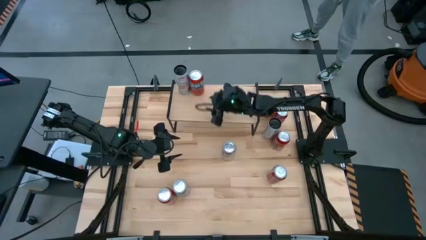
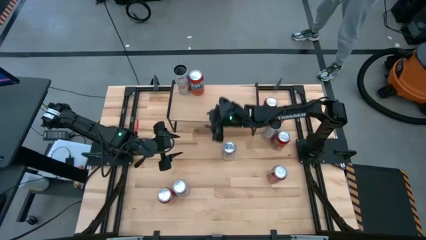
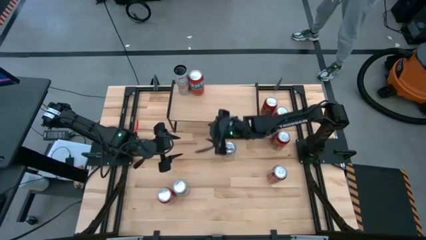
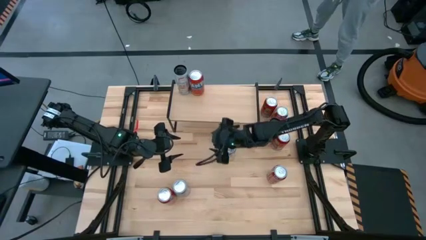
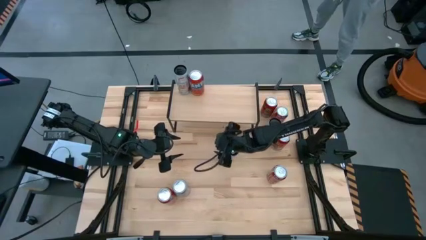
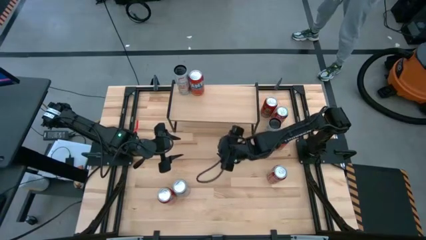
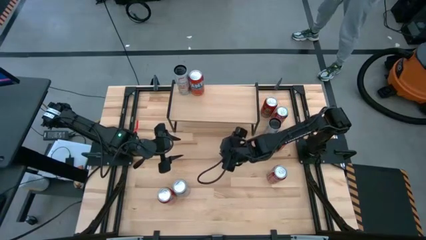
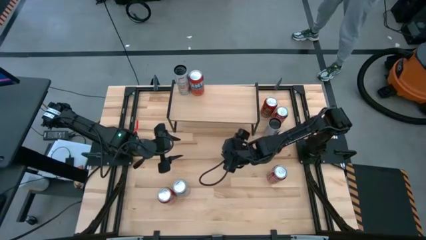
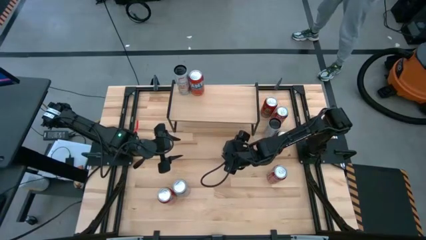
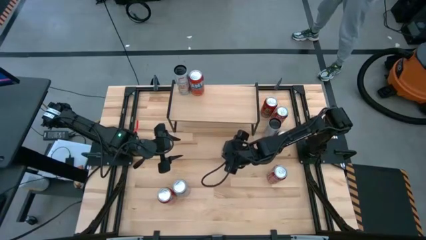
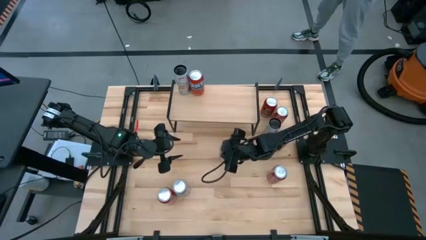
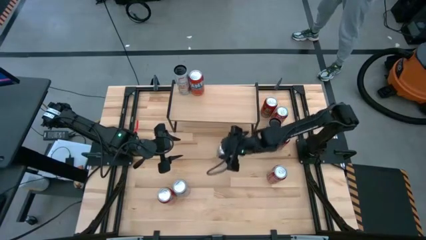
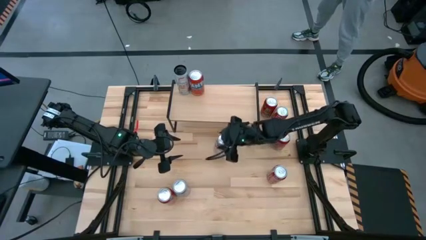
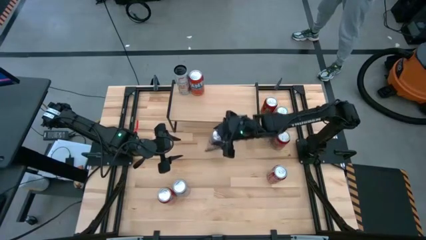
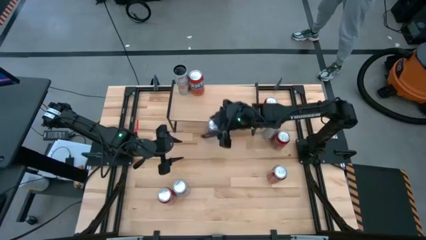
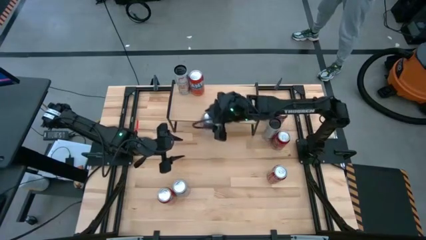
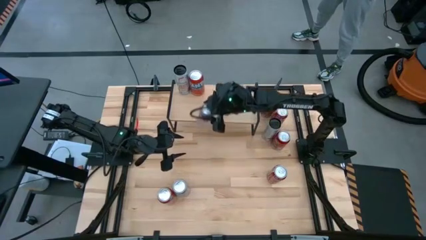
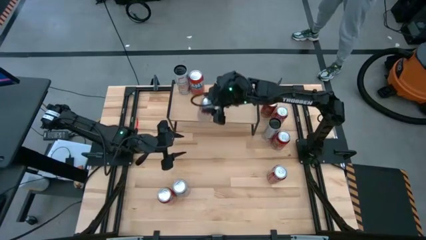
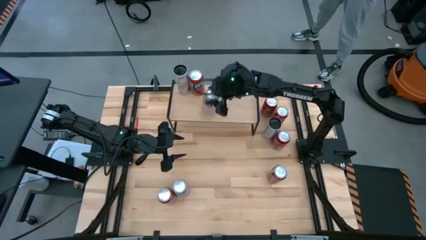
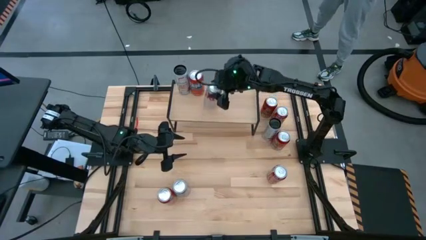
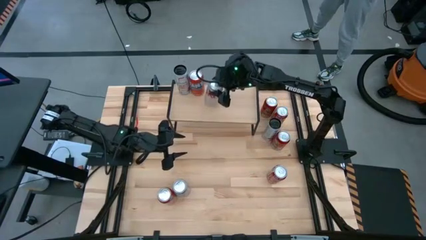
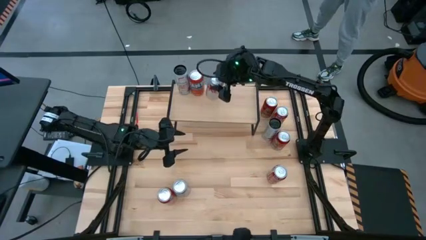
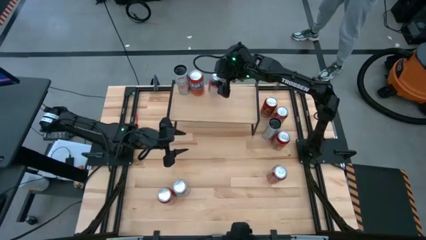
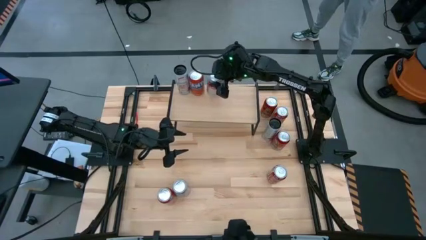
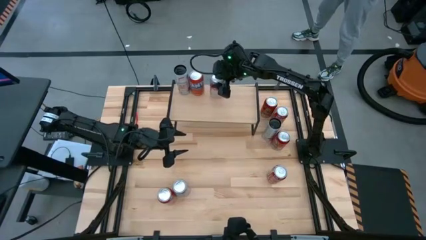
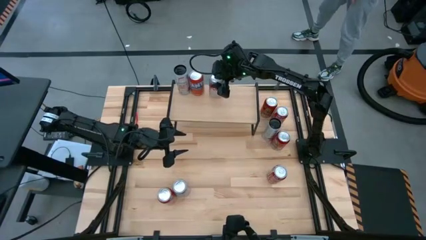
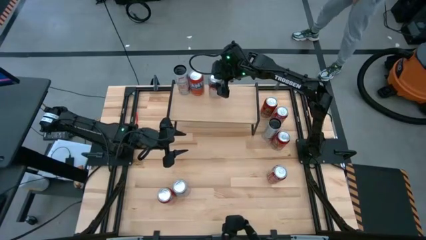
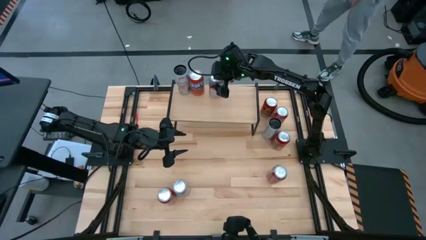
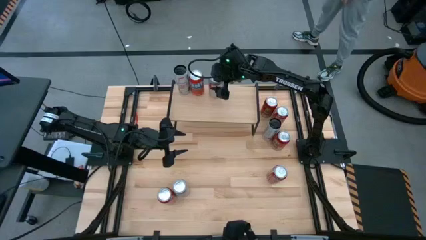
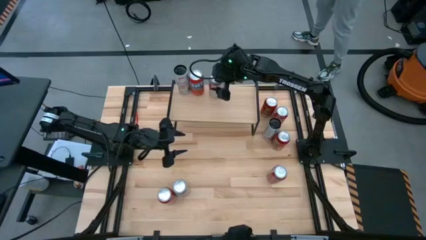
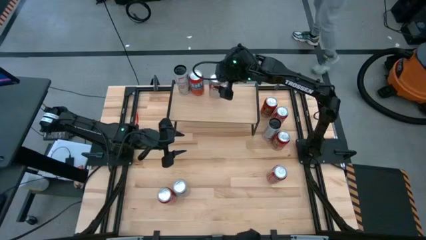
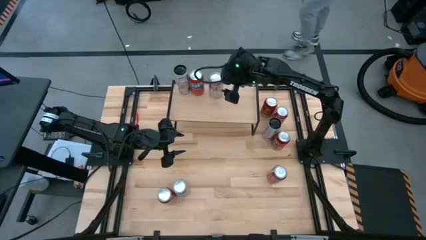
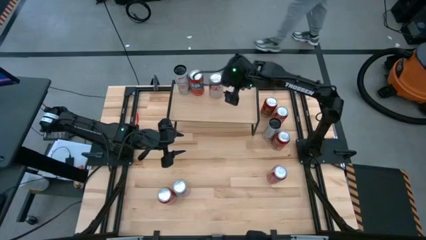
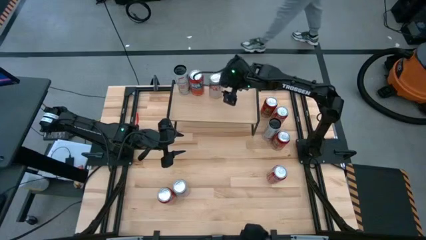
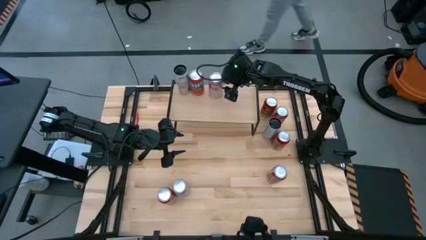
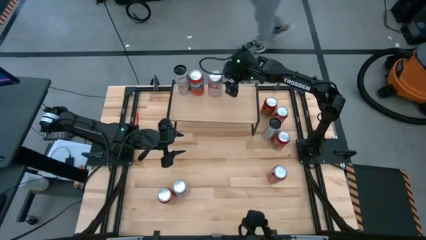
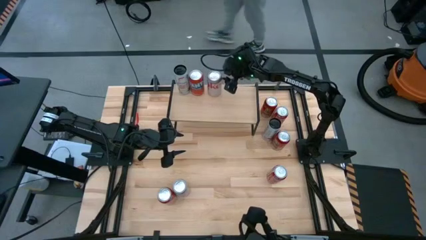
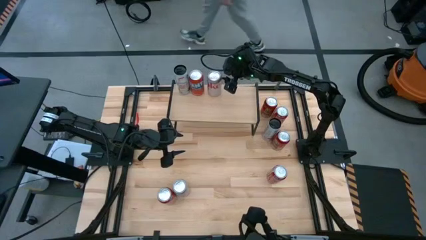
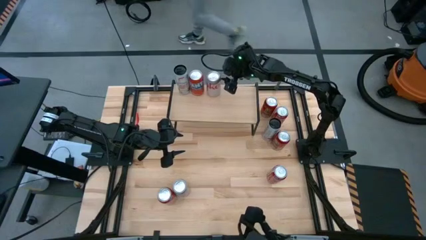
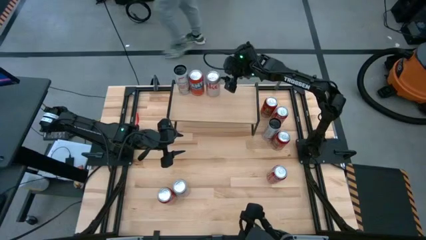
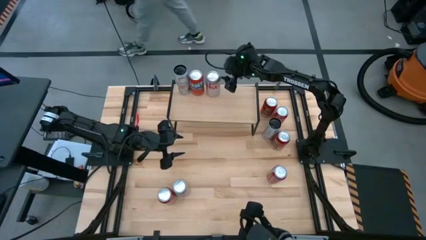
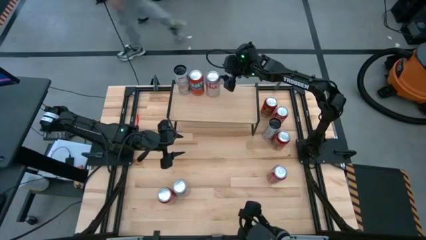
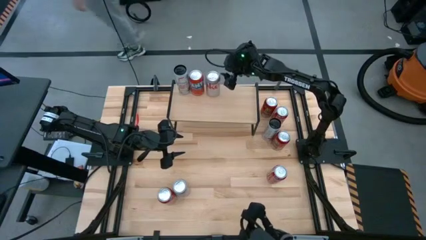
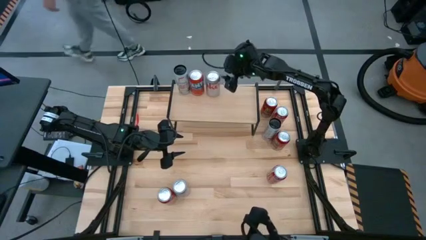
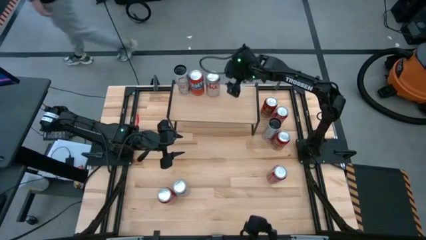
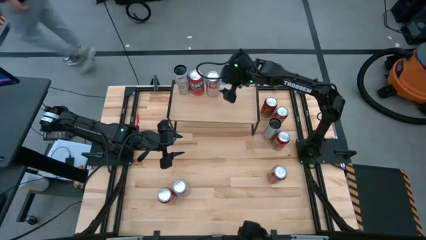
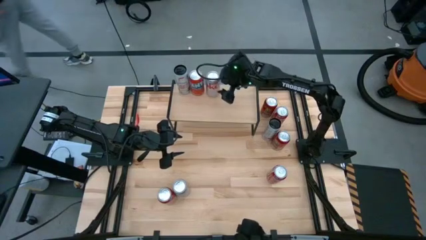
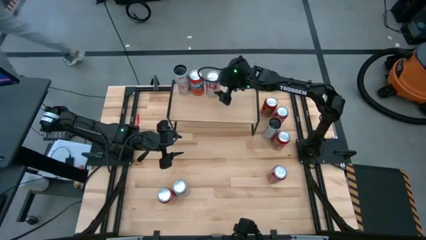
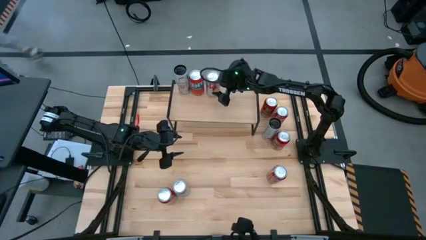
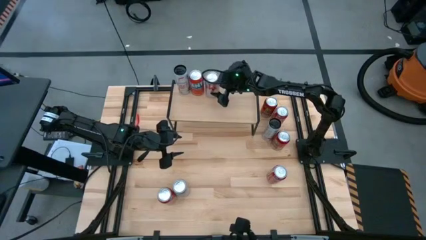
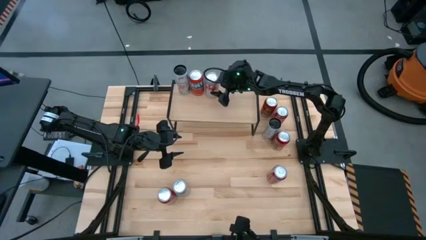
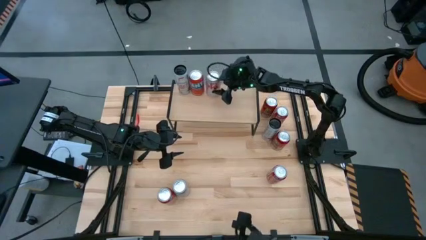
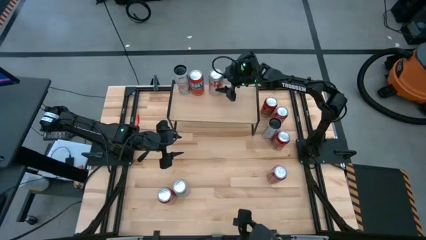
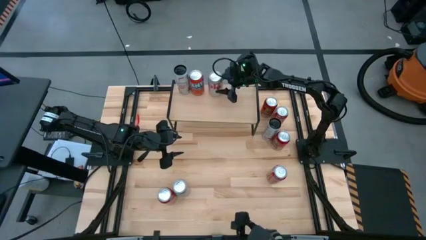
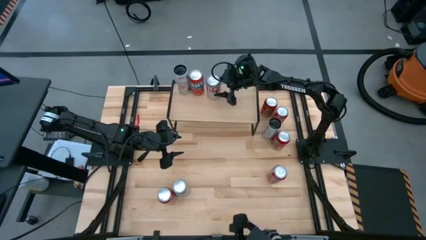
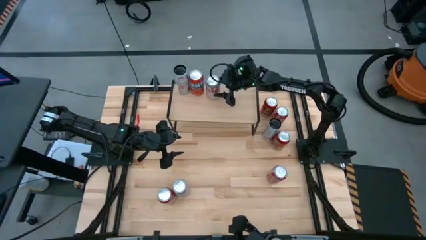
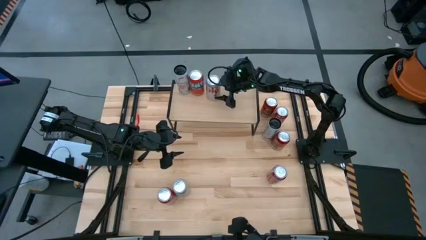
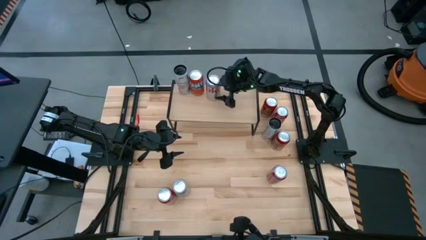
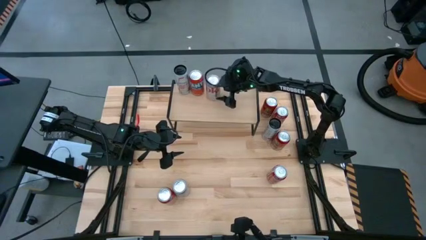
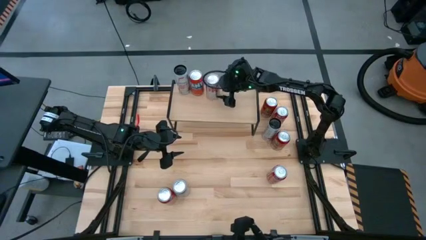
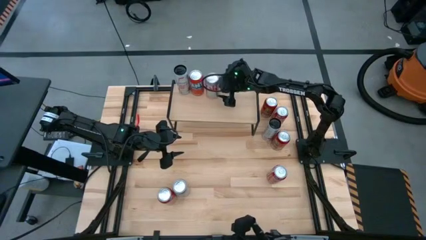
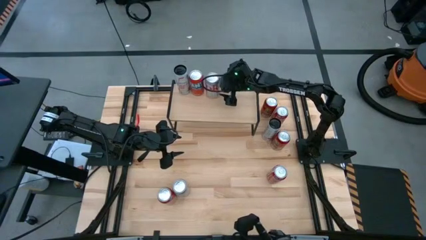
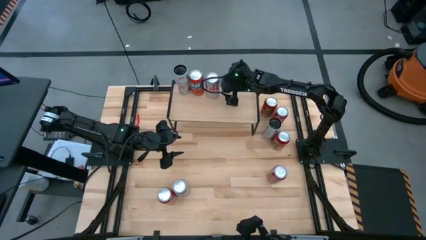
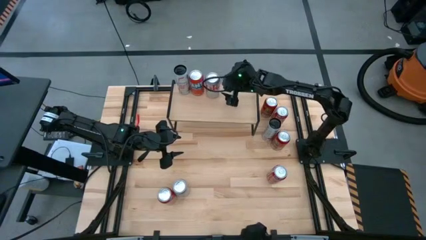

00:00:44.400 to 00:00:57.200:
Task: Place canned beverage on shelf
Put the center silver soda can on the shelf
